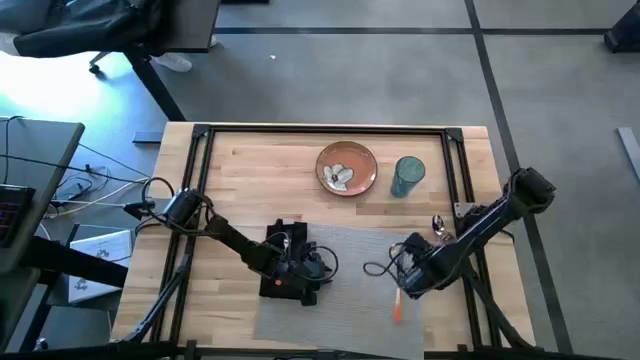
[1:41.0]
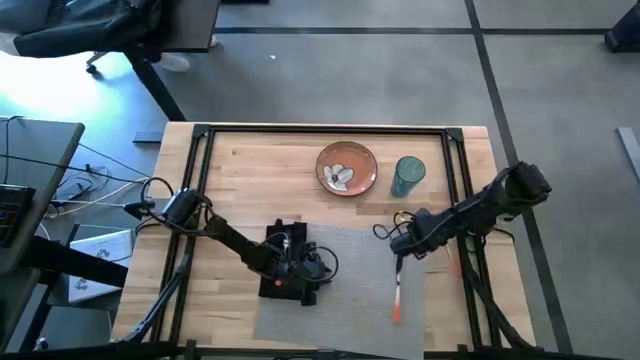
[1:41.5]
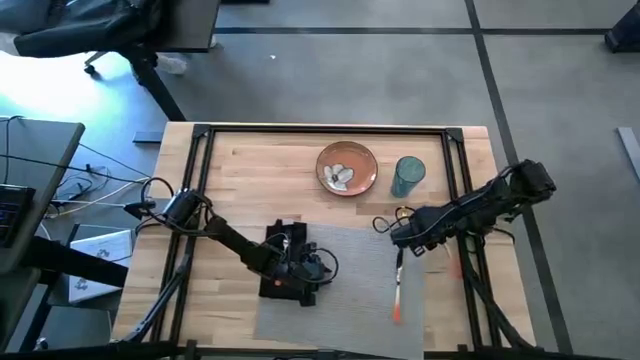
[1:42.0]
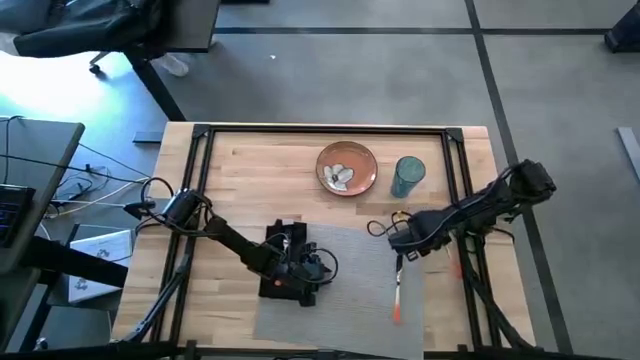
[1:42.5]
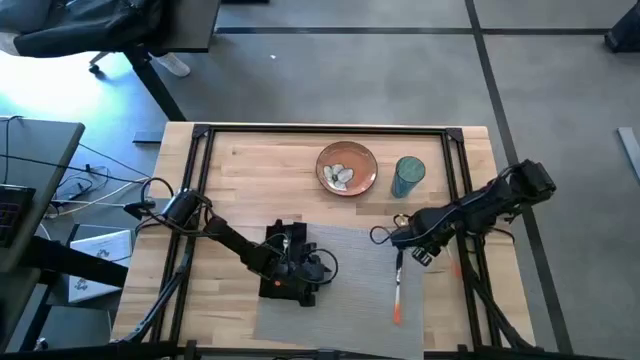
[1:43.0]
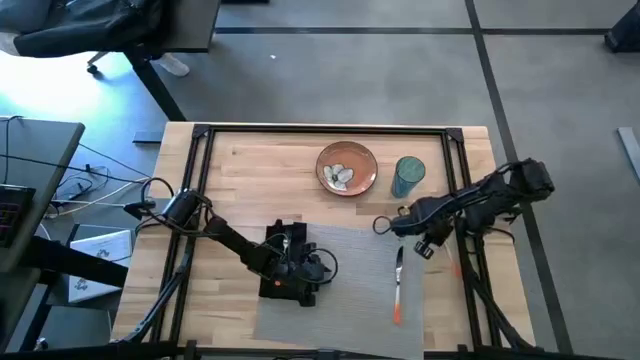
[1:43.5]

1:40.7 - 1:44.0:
Task: Set table place
Put the orange table spoon to the right of the orange table knife on the gray tablemat

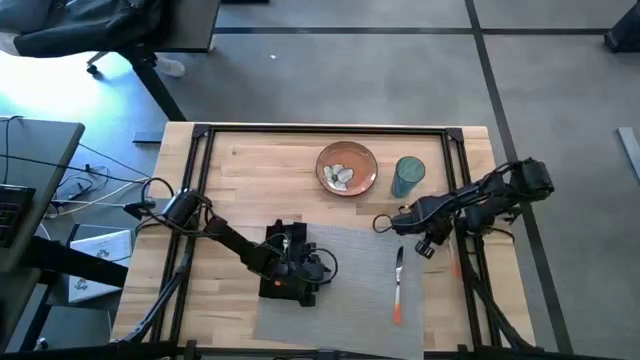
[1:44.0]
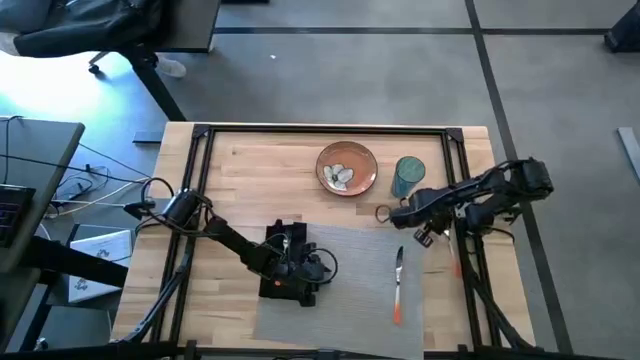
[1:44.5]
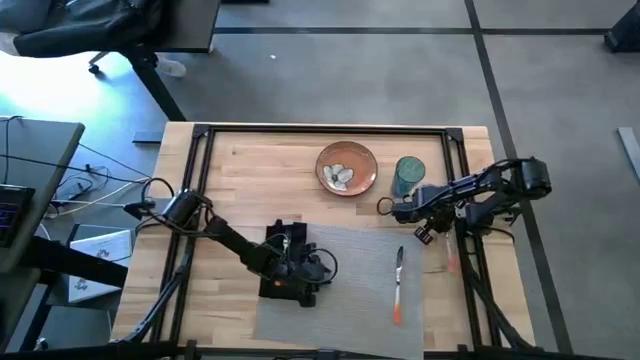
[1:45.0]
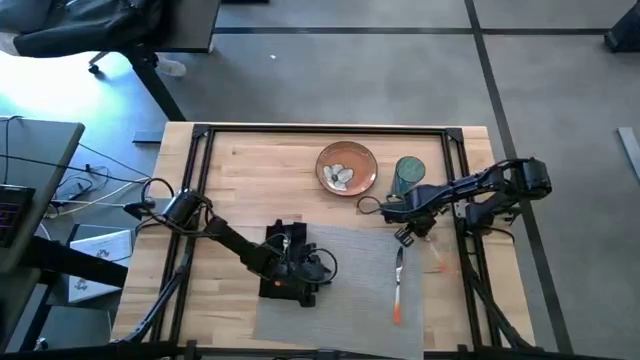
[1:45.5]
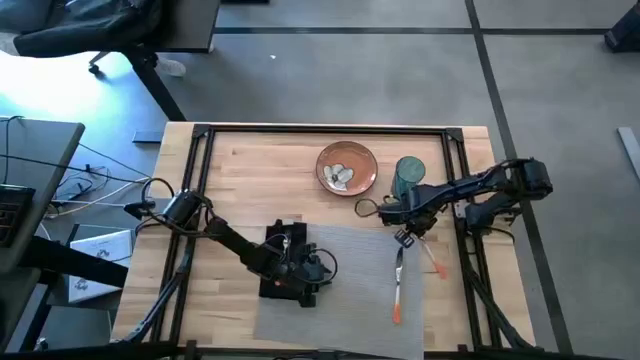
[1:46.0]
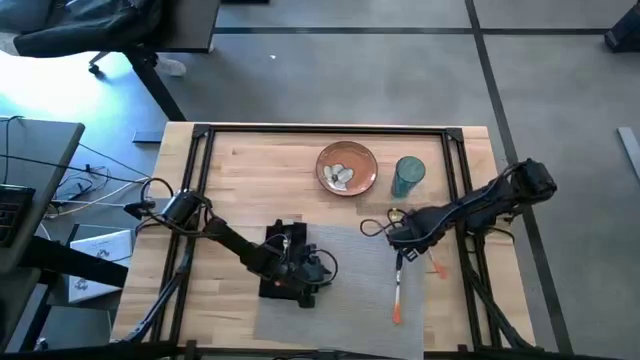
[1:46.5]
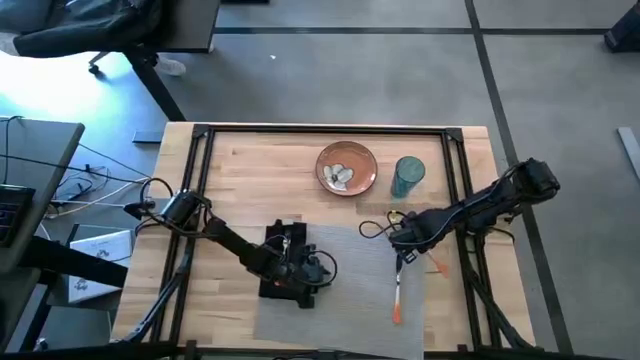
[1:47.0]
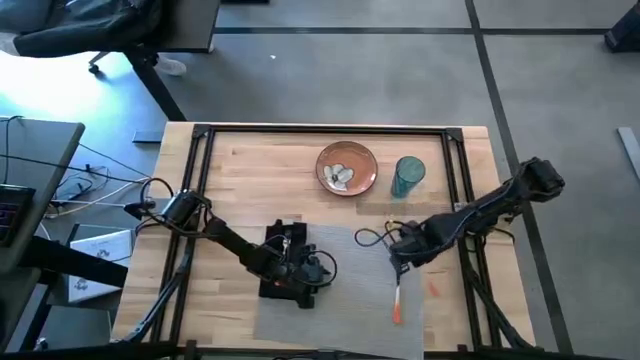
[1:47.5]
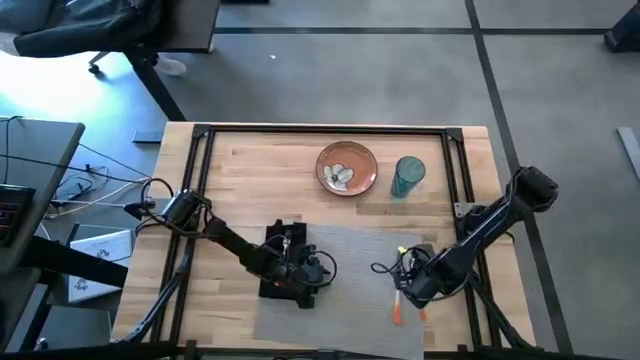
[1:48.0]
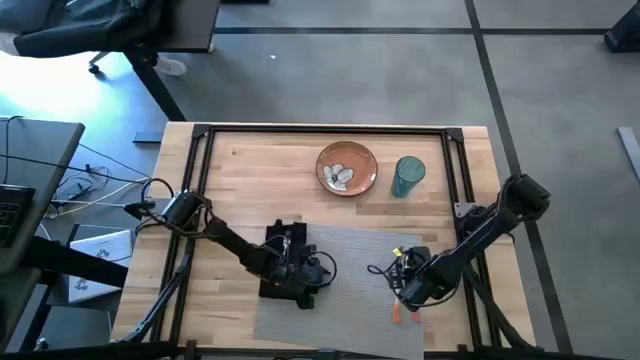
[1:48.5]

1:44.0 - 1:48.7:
Put the orange table spoon beside the orange table knife on the gray tablemat

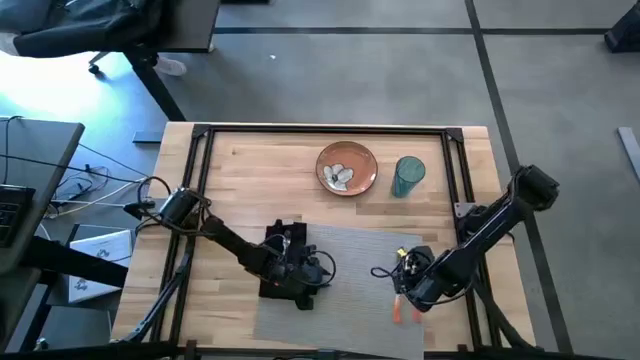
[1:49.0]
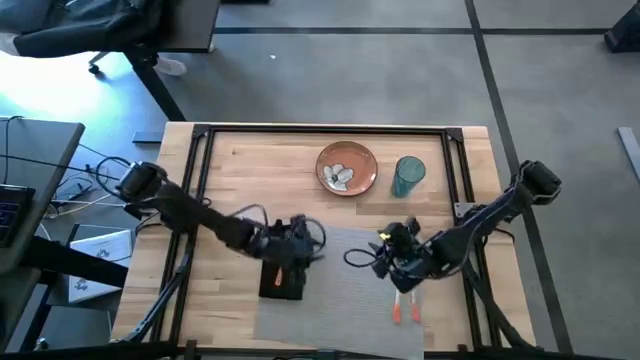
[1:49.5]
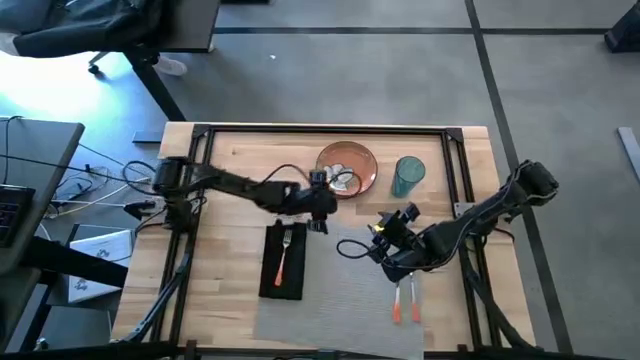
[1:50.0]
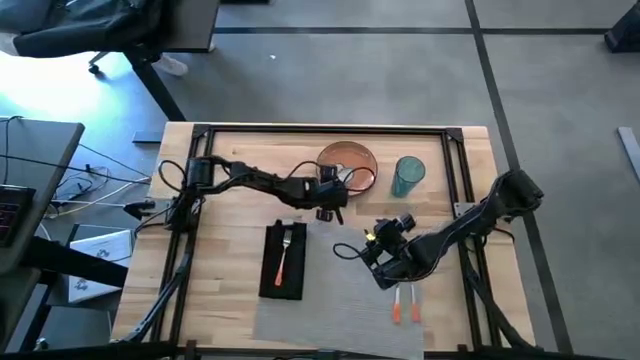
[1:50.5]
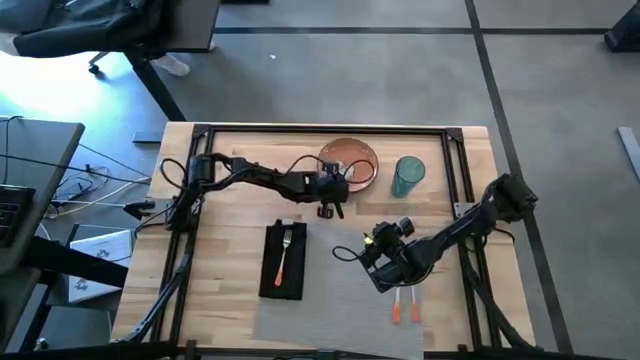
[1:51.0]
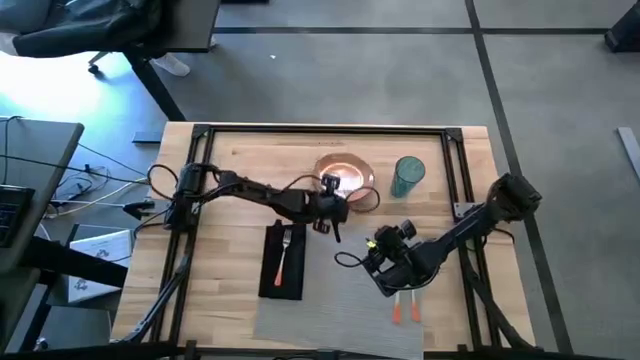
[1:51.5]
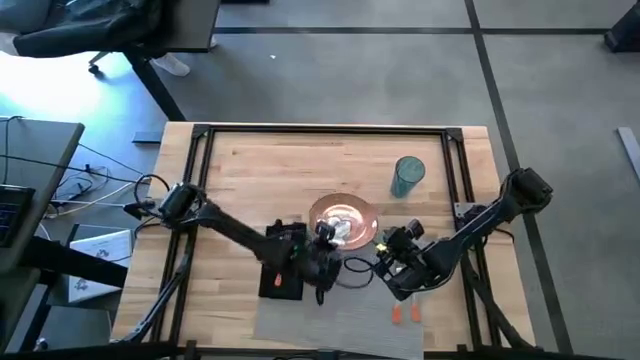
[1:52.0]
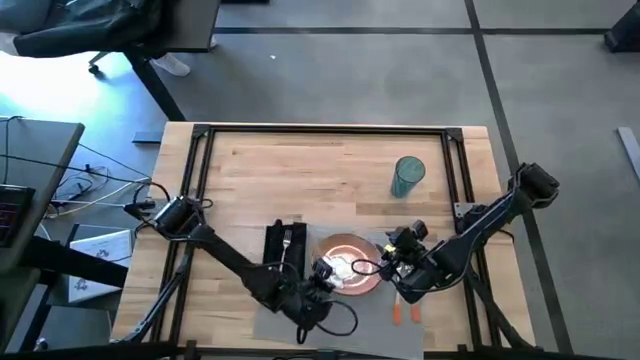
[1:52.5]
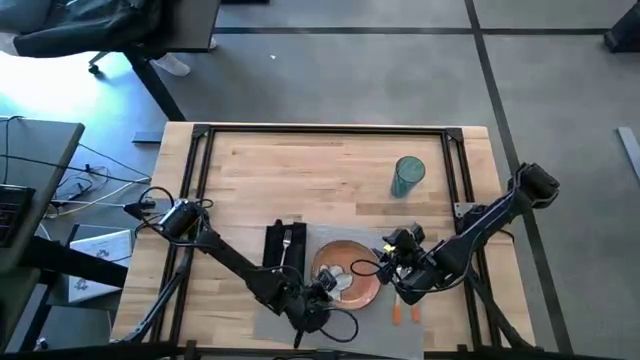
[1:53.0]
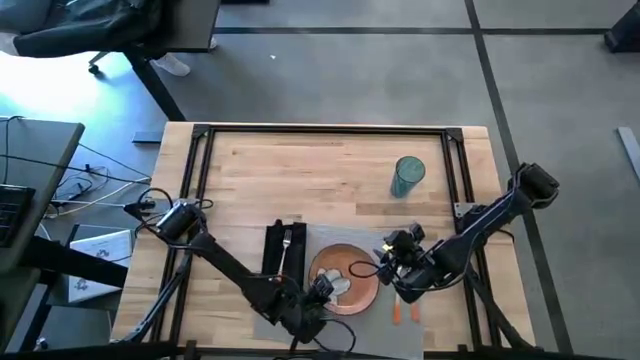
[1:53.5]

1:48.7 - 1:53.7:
Put the orange patterned plate in between the orange table knife and the black table napkin on the gray tablemat

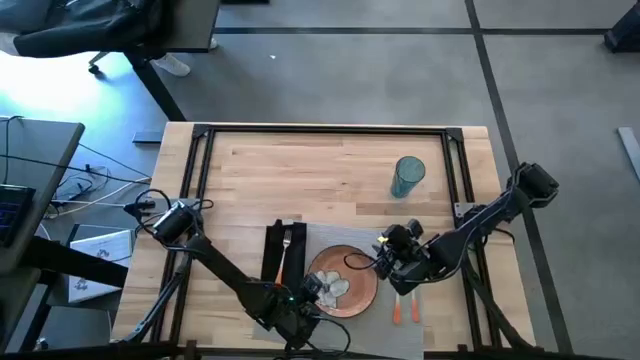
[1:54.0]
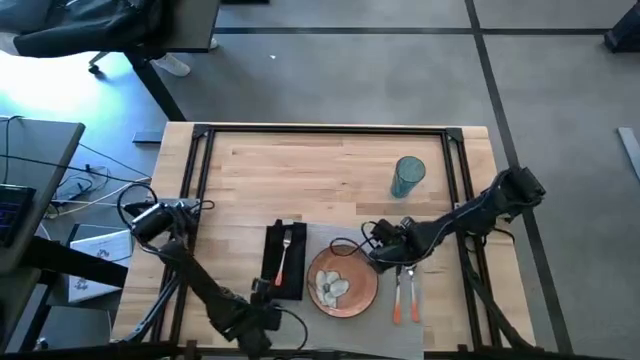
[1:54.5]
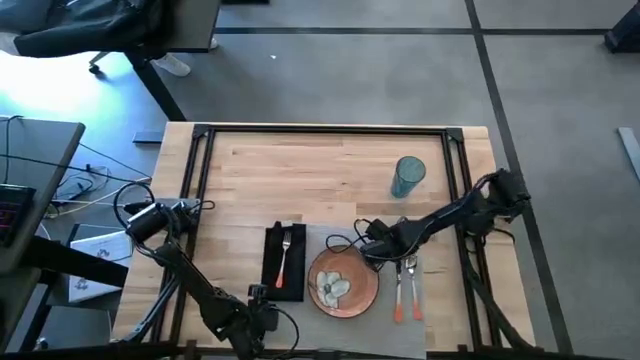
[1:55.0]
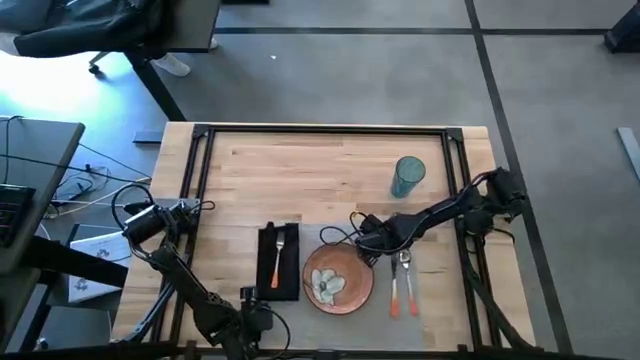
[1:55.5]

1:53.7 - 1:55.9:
Adjust the gray tablemat

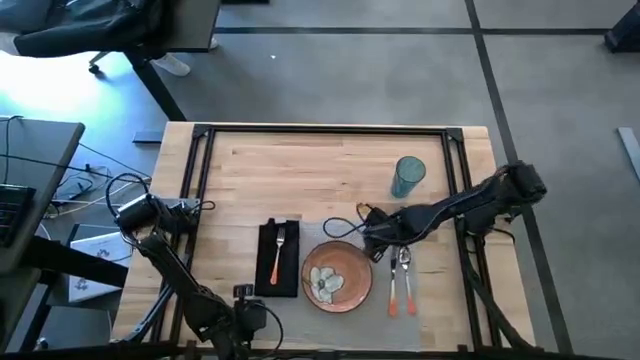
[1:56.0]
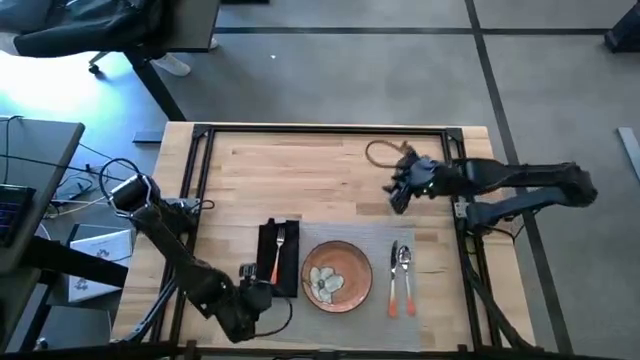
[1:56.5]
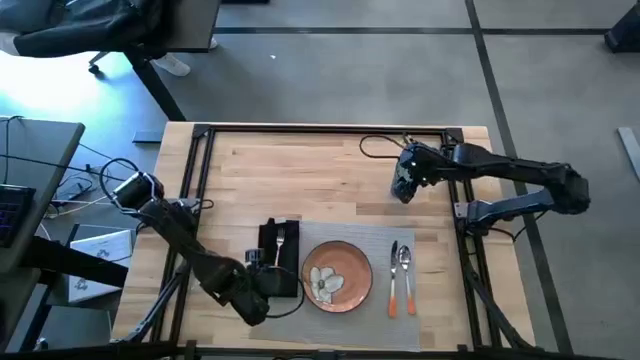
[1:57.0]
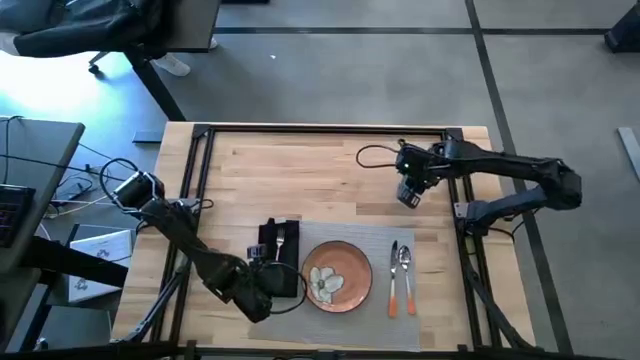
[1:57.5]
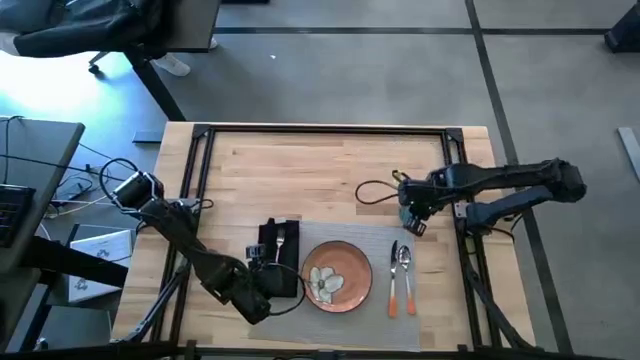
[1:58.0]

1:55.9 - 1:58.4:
Put the blue cup to the top of the gray tablemat
